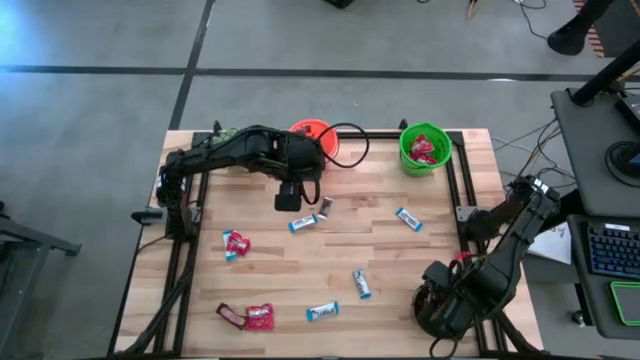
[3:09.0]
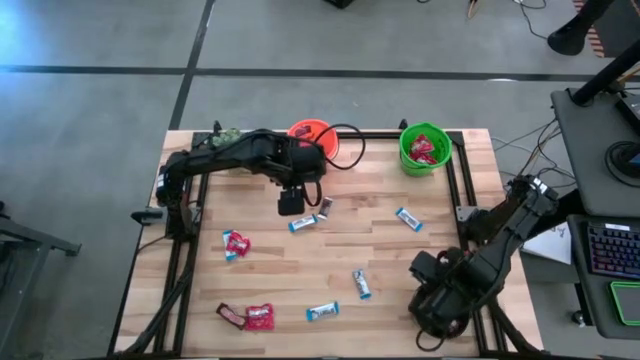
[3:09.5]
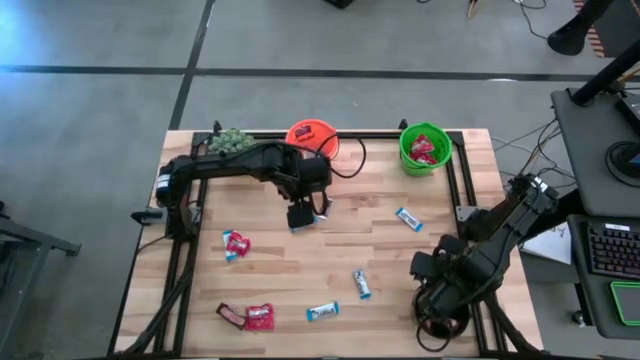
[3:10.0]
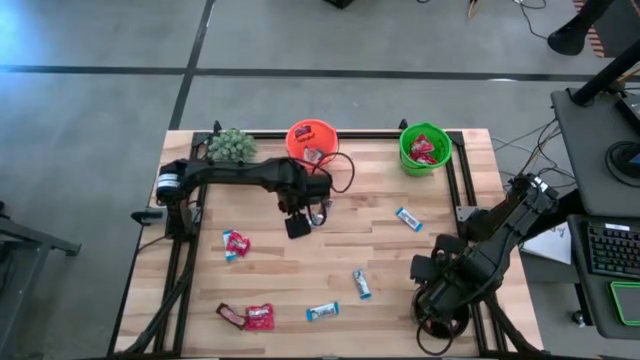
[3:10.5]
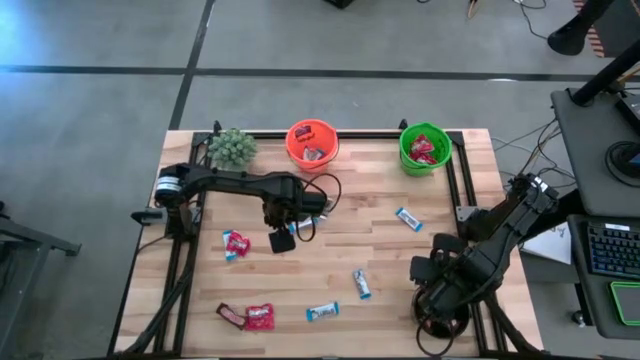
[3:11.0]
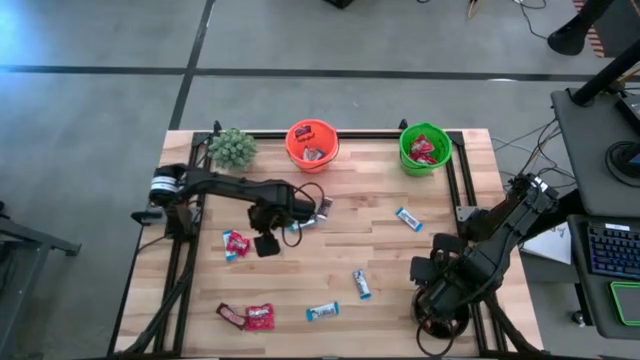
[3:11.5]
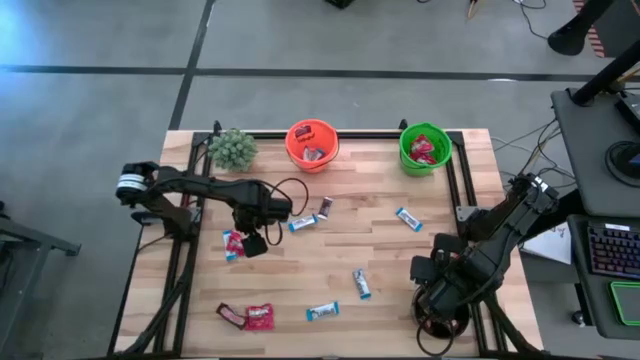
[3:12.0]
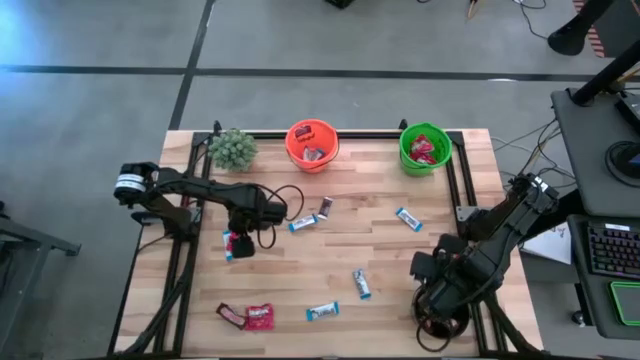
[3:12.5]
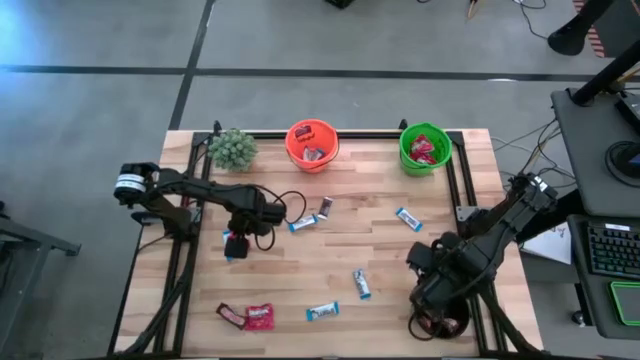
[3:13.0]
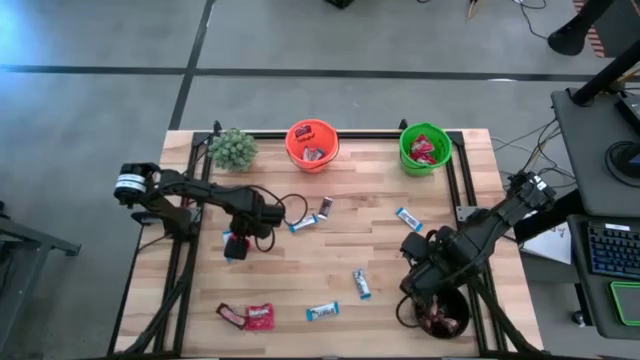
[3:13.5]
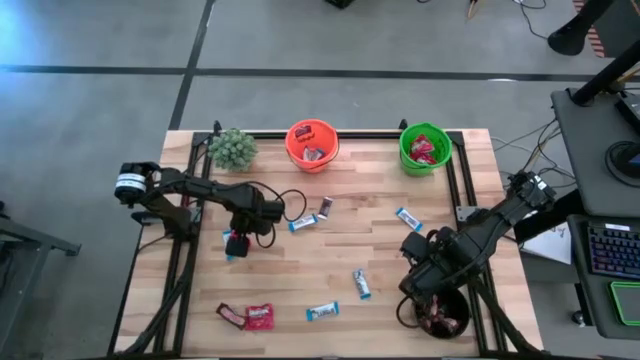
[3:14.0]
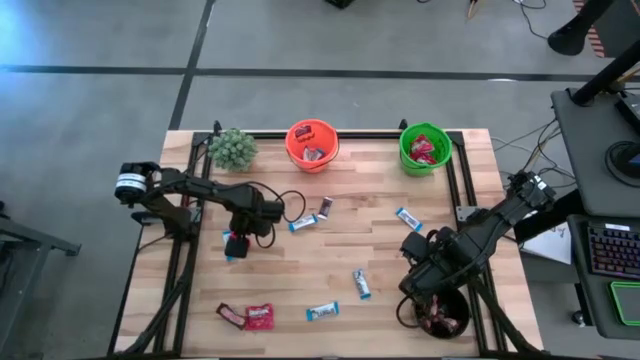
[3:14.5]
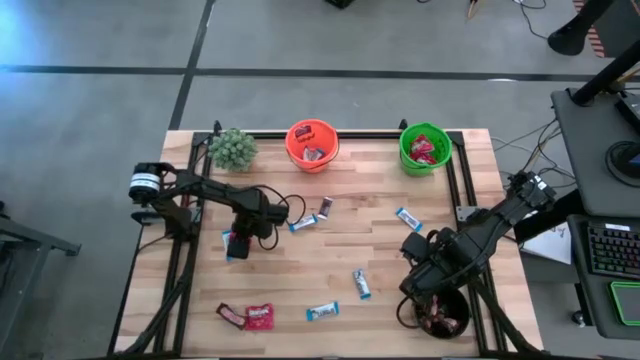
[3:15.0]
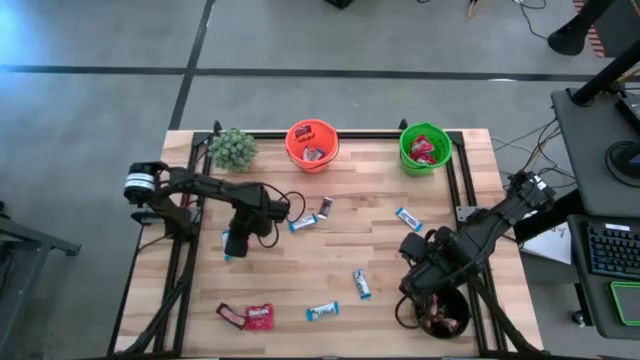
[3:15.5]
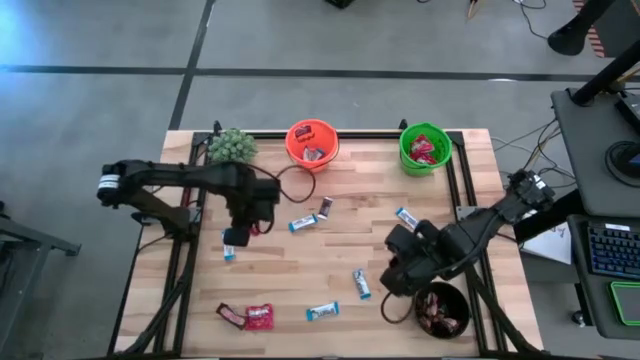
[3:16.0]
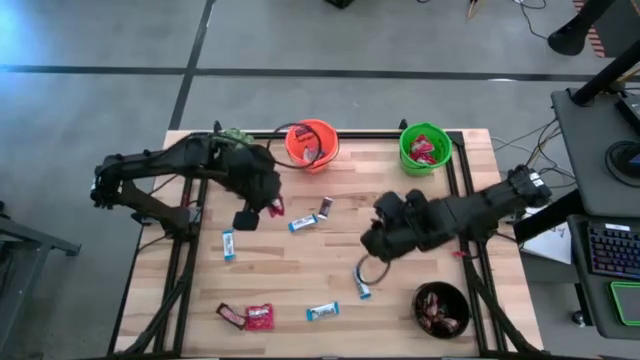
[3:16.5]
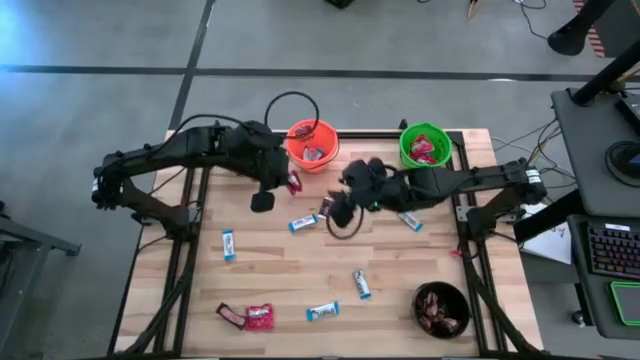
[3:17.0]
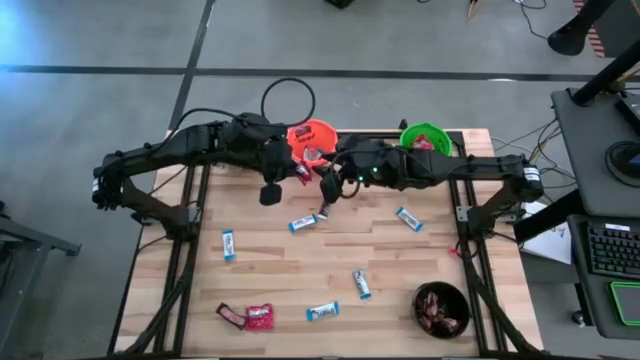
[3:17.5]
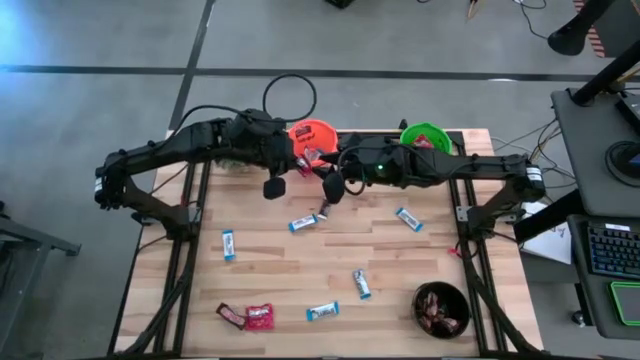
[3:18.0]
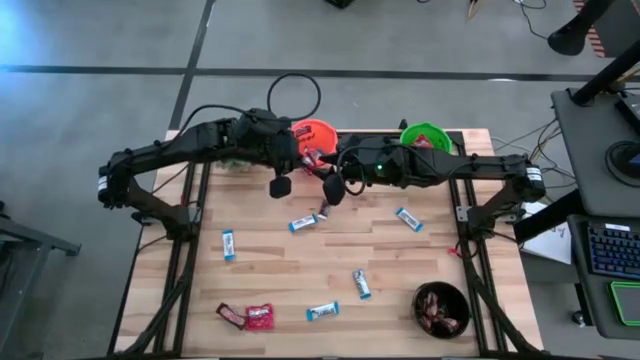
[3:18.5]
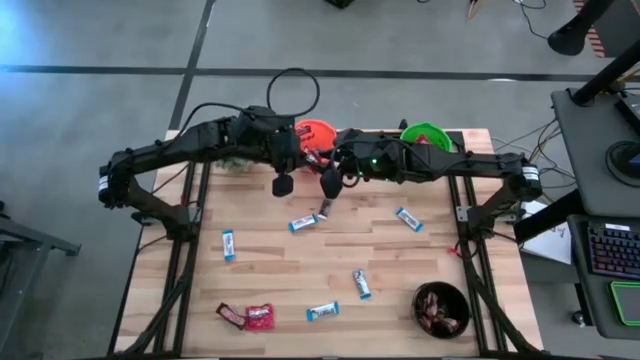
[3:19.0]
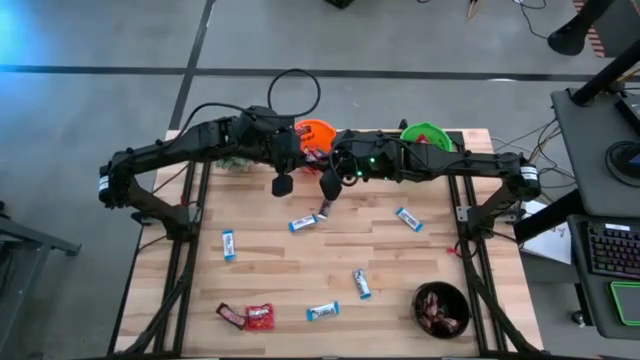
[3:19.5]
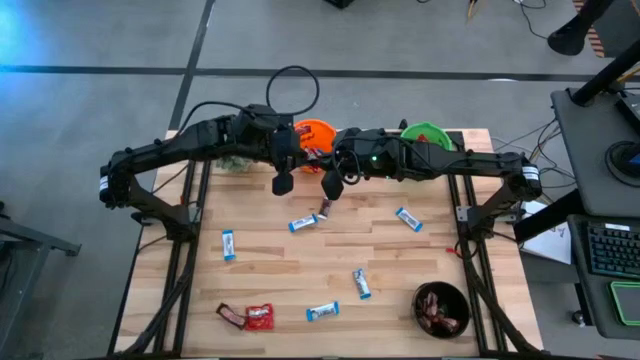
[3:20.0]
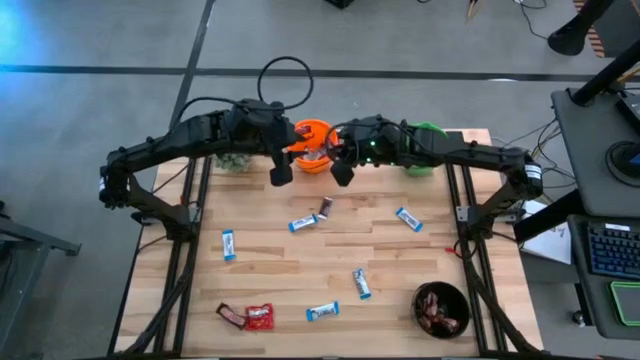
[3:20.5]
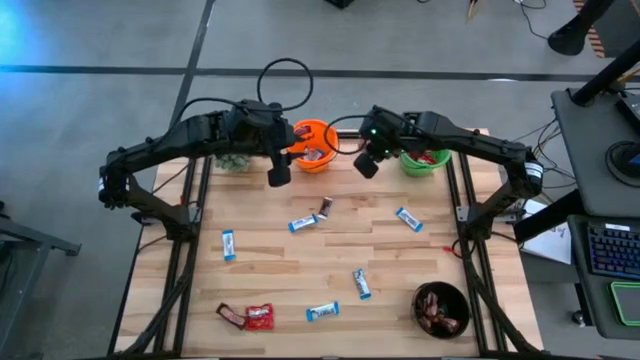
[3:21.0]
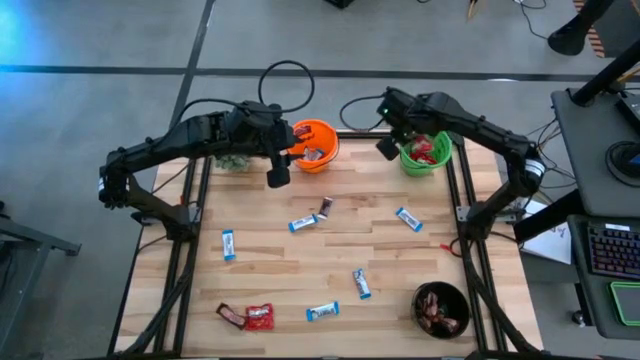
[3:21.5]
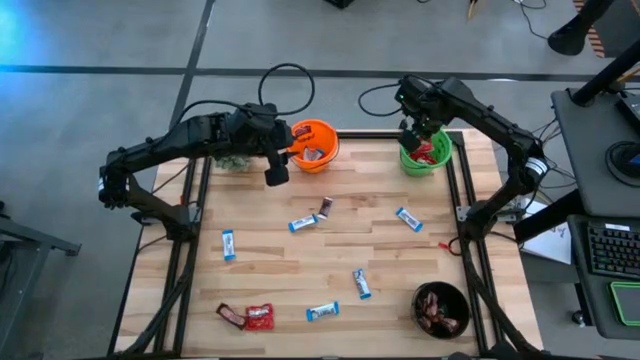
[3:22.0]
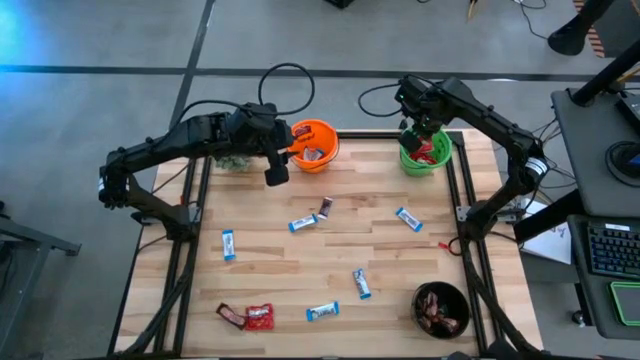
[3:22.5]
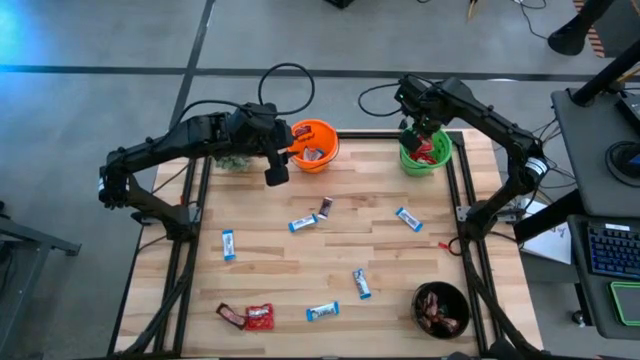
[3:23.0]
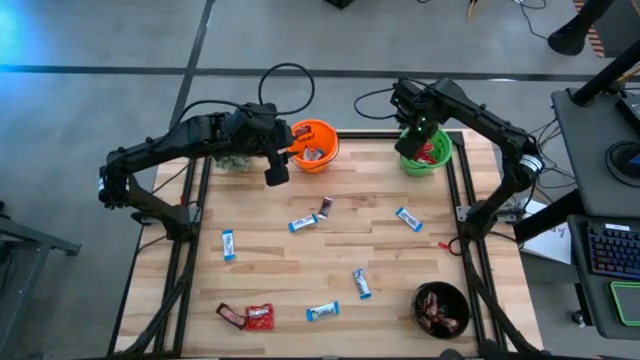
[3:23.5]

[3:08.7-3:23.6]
Task: Sort candy
Put the red candy into the green bucket

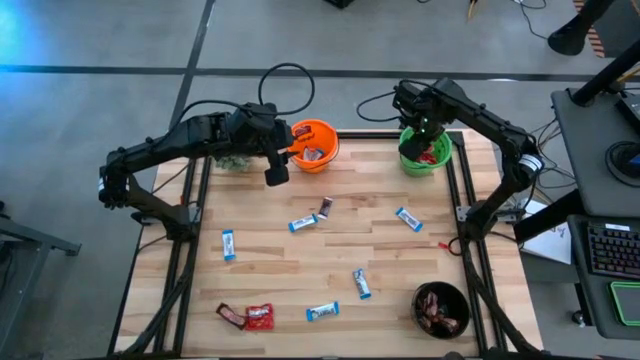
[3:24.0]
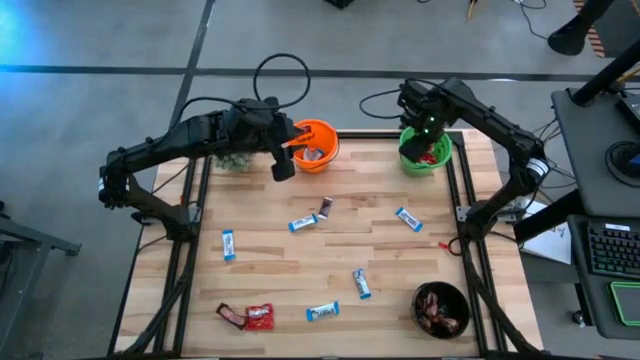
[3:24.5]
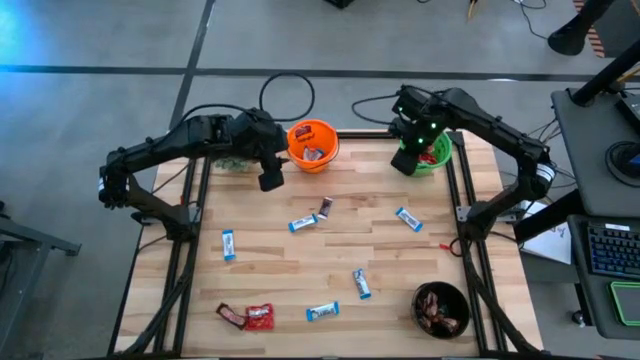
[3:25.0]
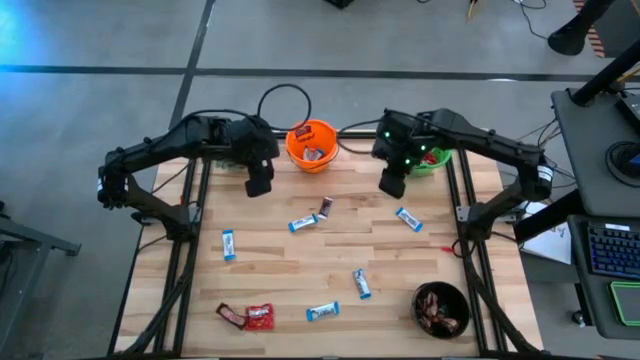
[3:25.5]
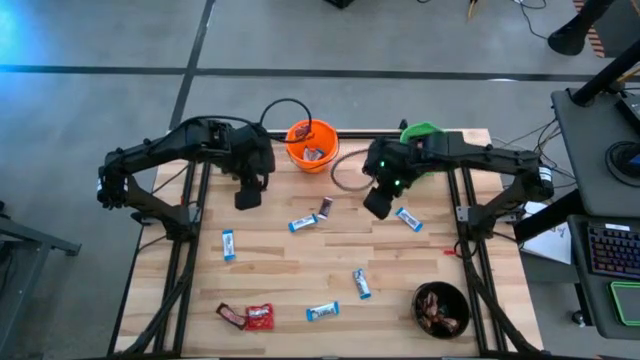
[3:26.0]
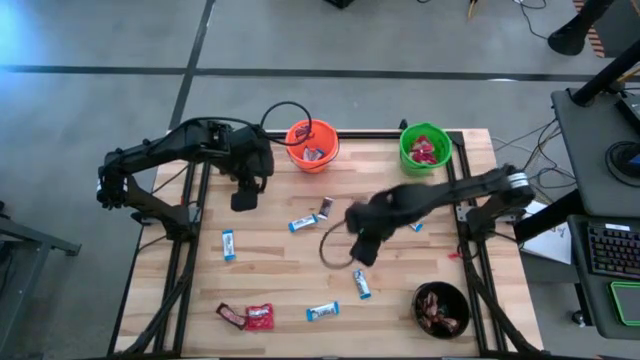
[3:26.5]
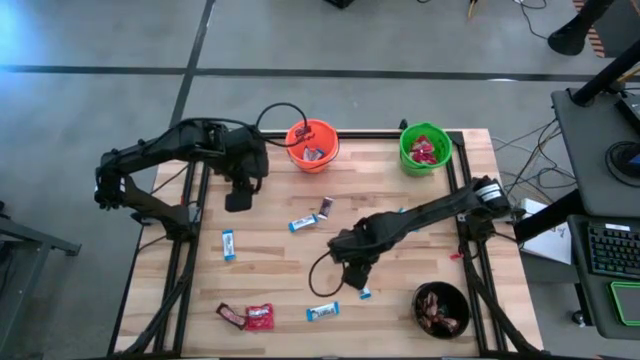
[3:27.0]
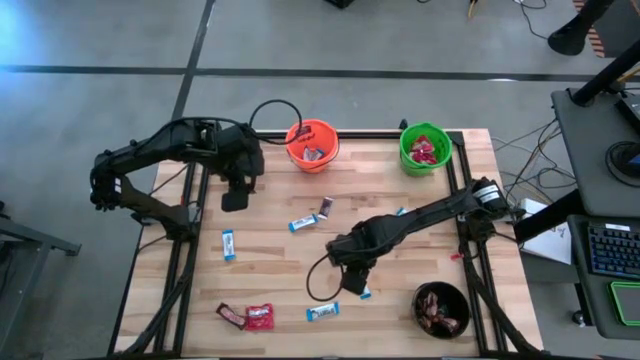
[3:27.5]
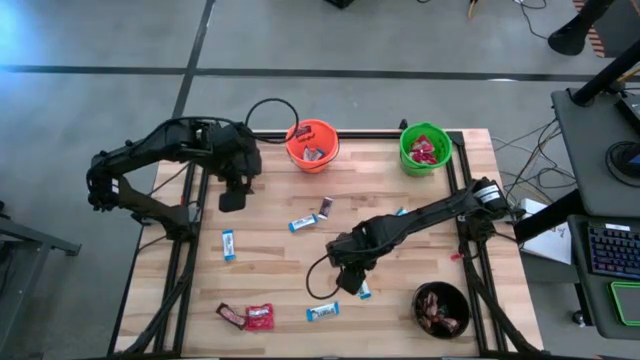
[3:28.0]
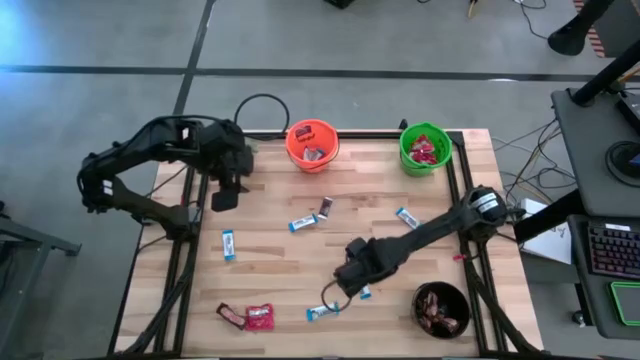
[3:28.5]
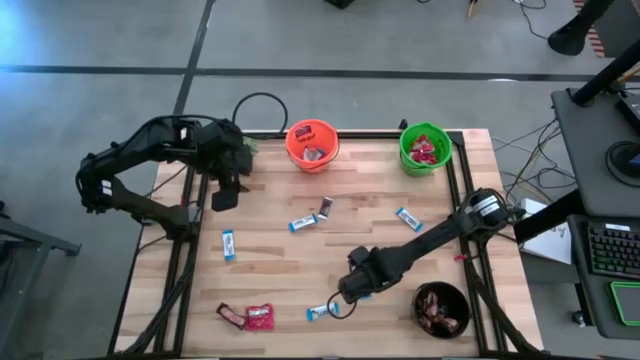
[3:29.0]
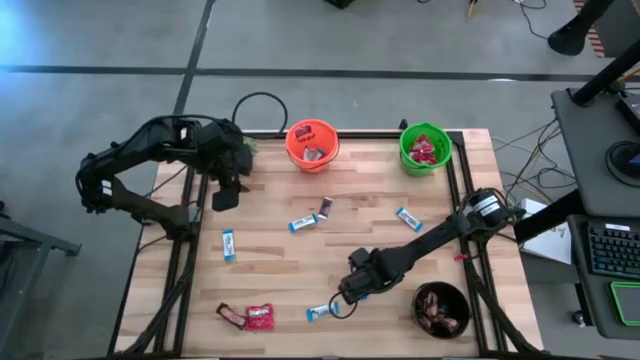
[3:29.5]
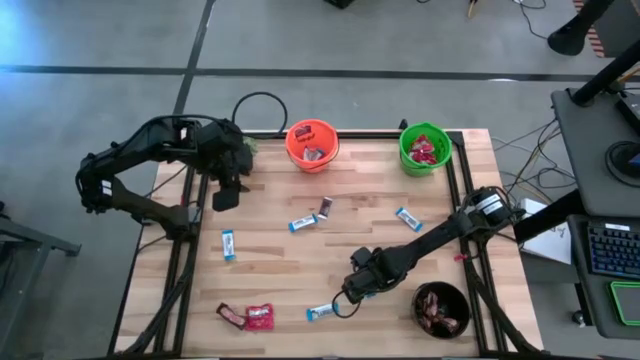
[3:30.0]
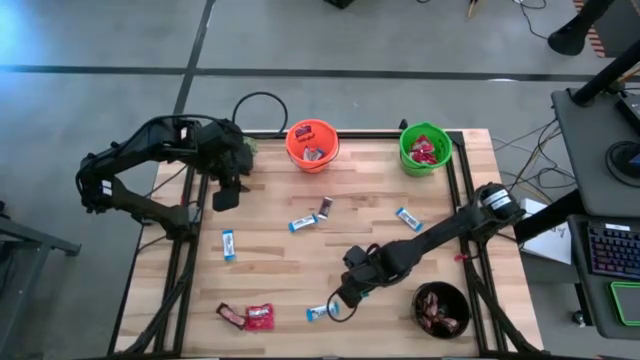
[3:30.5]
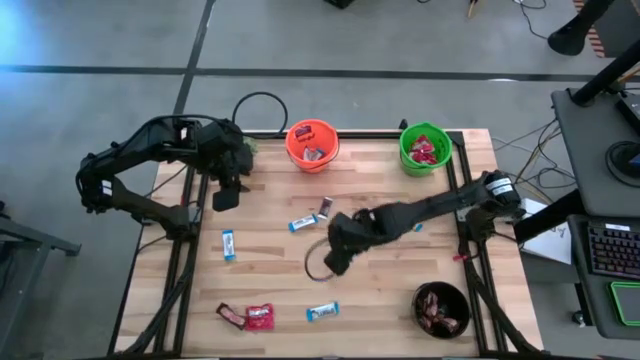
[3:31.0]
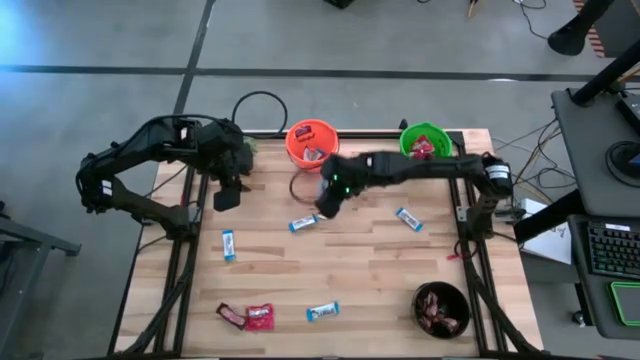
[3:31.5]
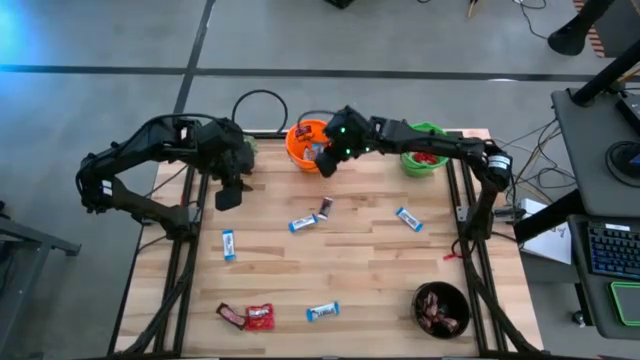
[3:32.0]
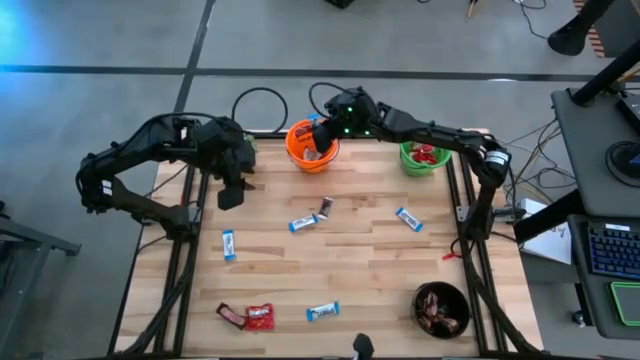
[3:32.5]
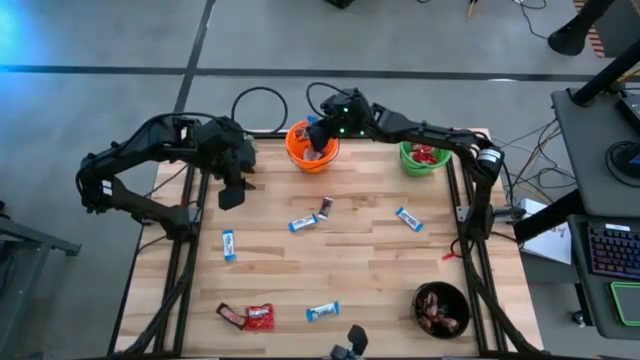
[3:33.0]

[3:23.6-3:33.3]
Put the white chocolate into the orange bucket
